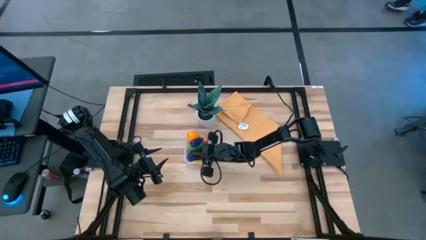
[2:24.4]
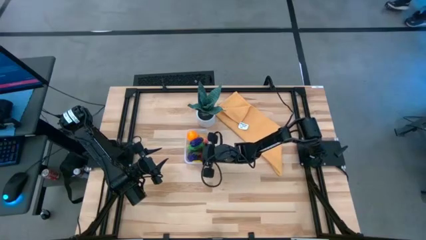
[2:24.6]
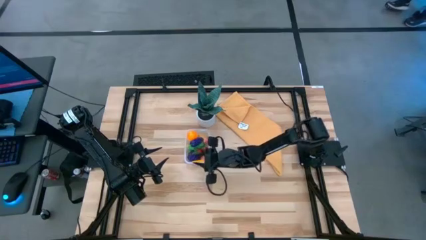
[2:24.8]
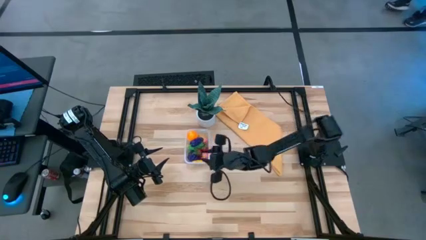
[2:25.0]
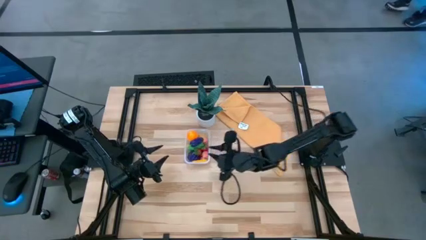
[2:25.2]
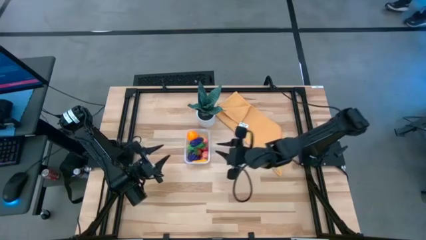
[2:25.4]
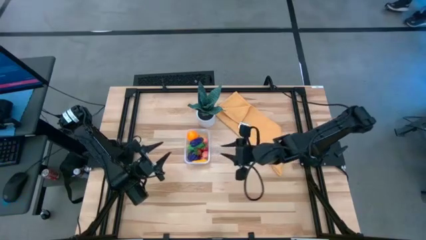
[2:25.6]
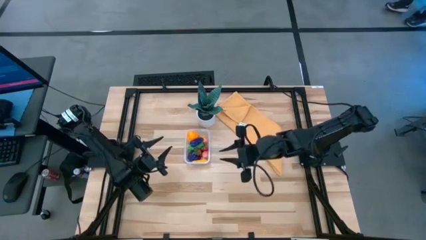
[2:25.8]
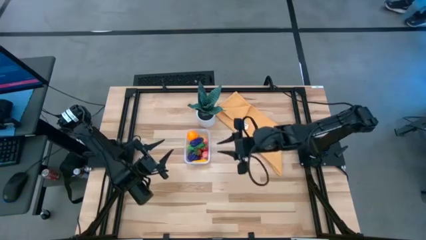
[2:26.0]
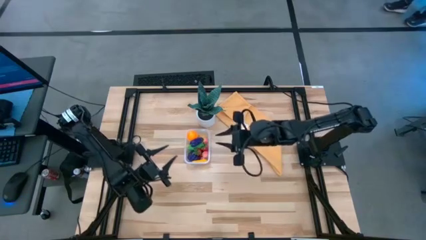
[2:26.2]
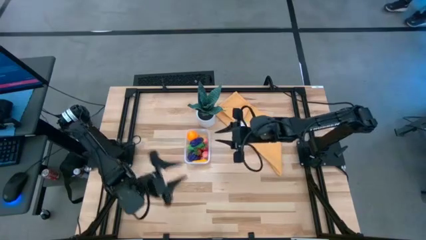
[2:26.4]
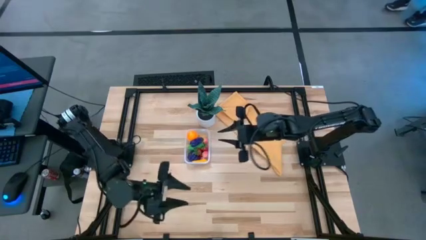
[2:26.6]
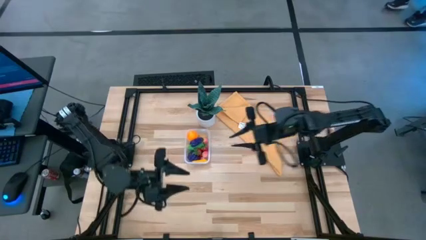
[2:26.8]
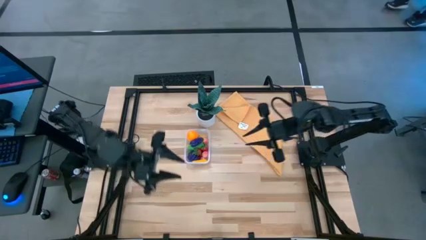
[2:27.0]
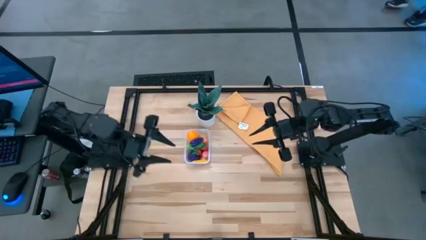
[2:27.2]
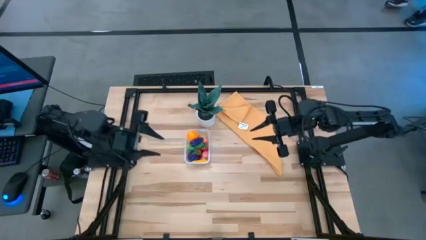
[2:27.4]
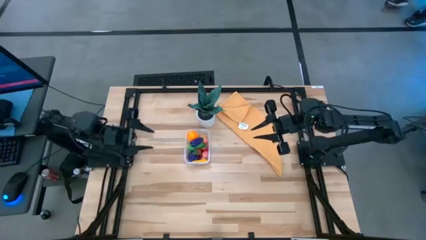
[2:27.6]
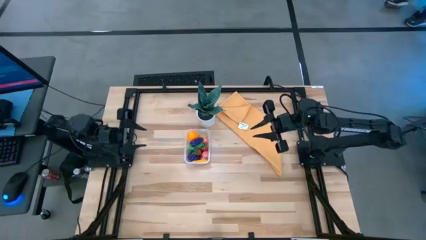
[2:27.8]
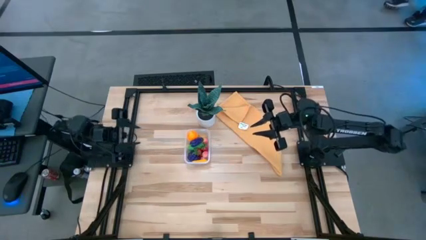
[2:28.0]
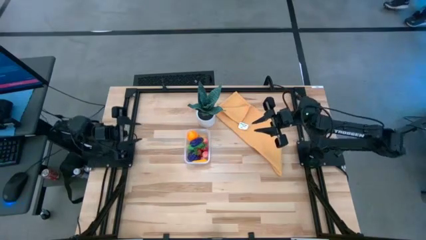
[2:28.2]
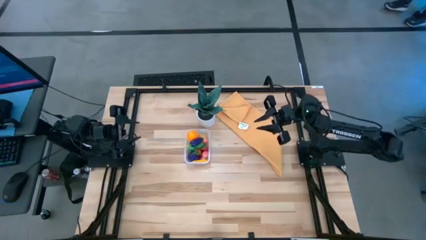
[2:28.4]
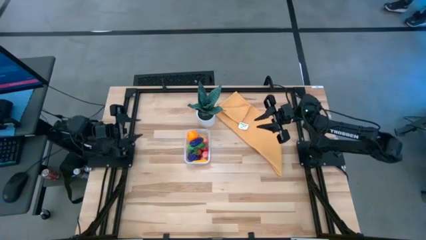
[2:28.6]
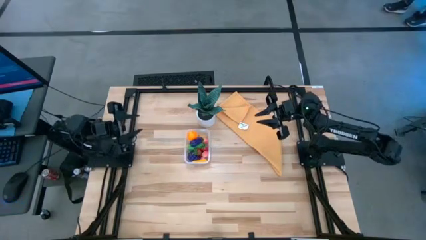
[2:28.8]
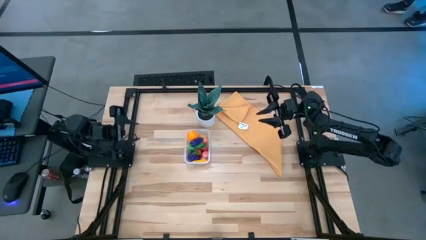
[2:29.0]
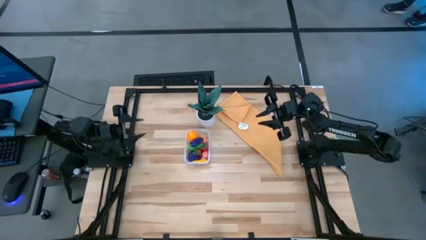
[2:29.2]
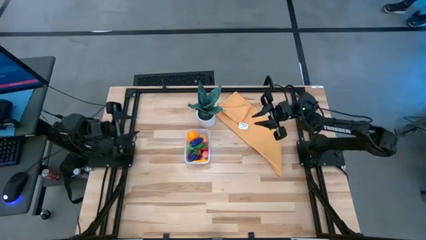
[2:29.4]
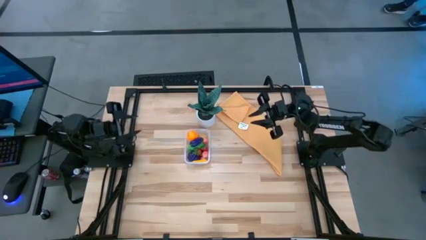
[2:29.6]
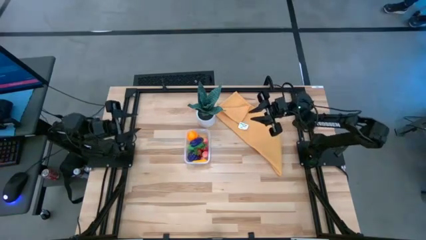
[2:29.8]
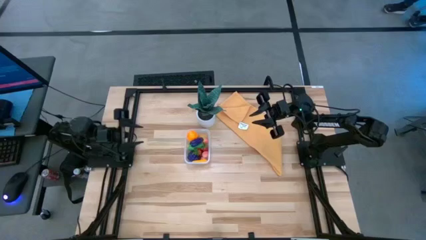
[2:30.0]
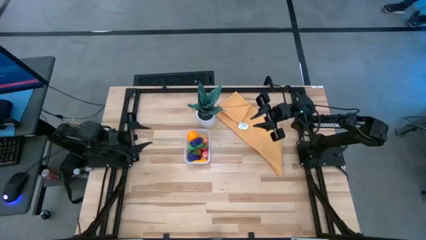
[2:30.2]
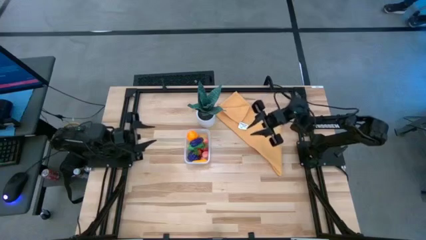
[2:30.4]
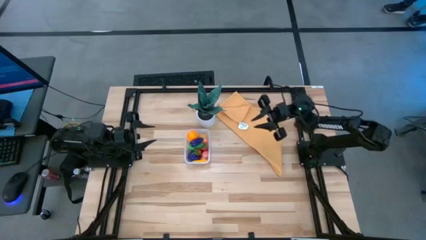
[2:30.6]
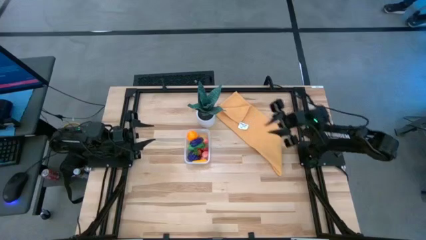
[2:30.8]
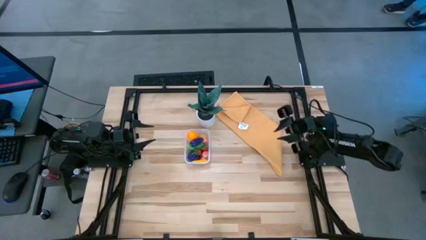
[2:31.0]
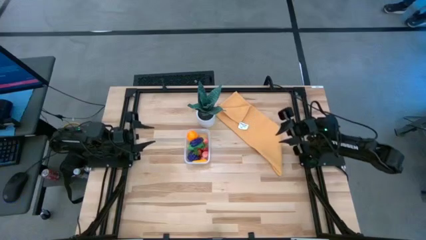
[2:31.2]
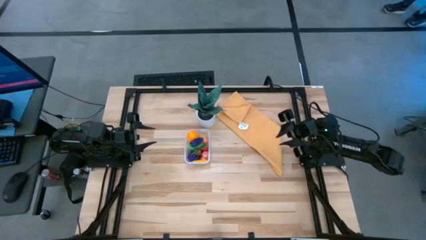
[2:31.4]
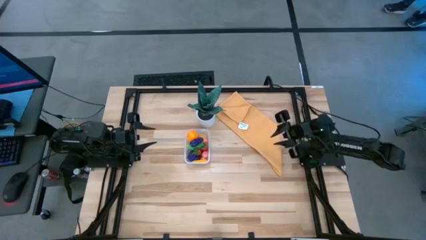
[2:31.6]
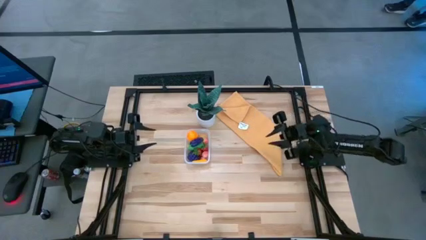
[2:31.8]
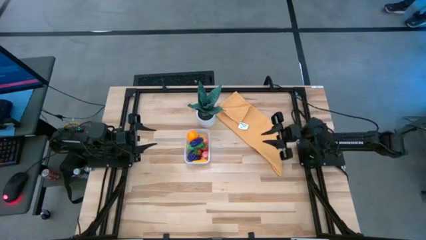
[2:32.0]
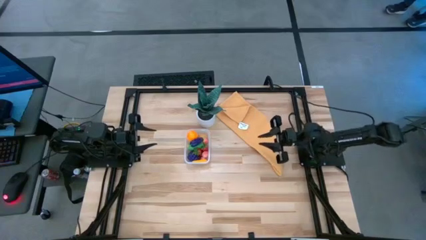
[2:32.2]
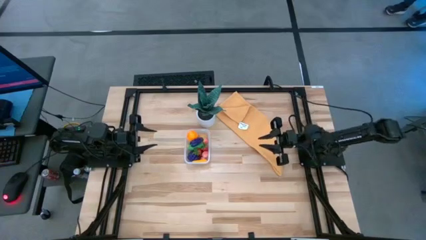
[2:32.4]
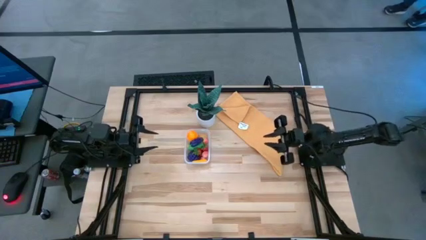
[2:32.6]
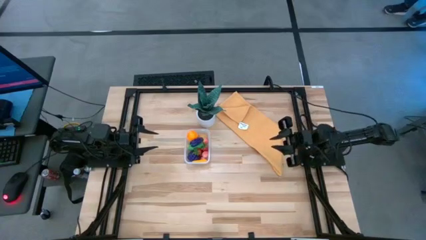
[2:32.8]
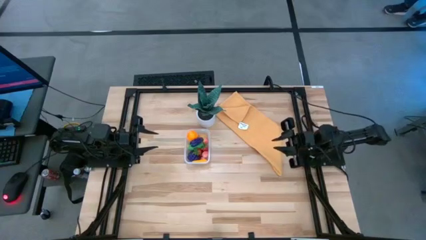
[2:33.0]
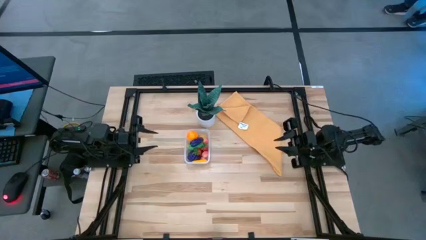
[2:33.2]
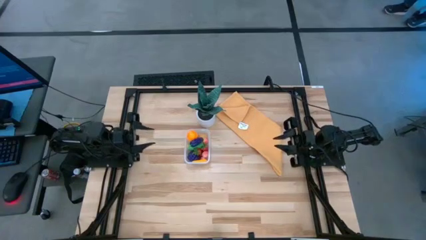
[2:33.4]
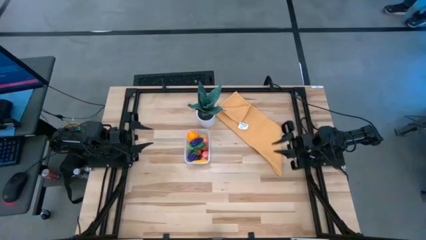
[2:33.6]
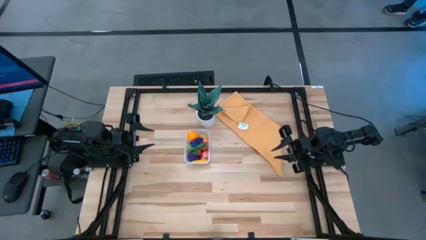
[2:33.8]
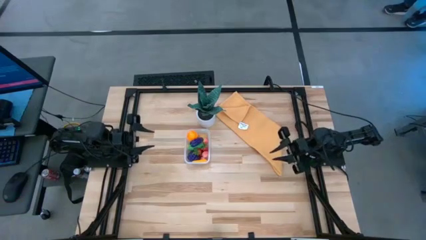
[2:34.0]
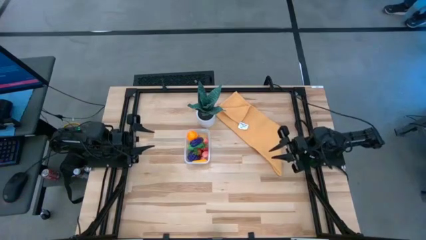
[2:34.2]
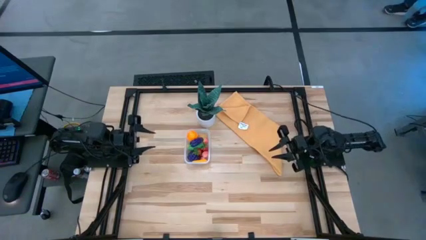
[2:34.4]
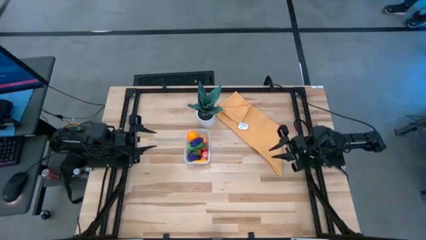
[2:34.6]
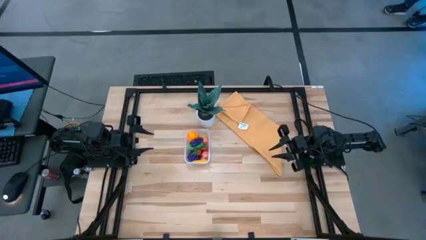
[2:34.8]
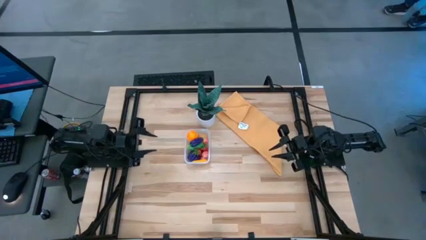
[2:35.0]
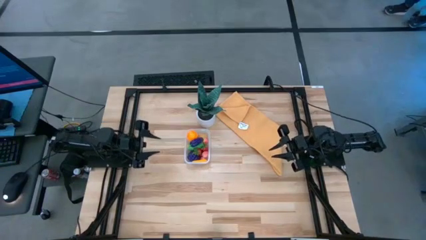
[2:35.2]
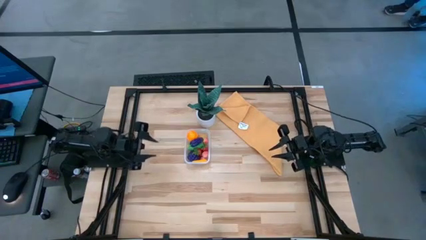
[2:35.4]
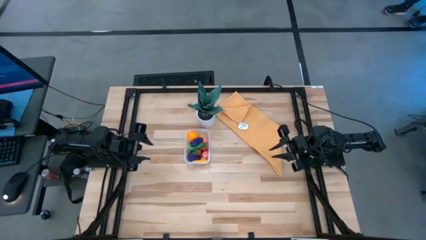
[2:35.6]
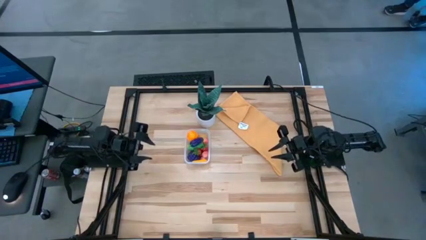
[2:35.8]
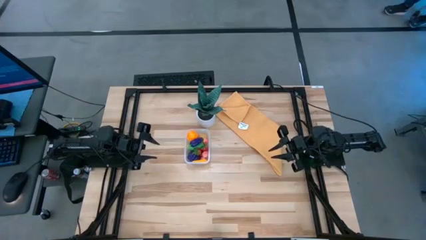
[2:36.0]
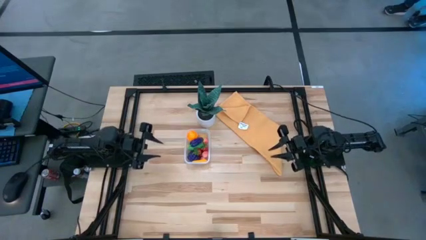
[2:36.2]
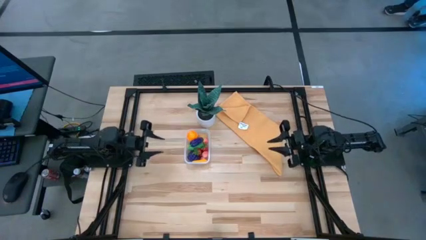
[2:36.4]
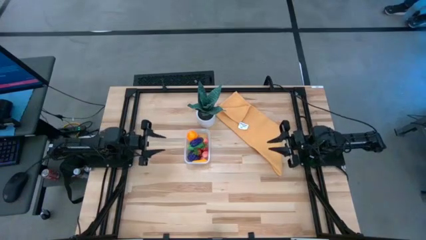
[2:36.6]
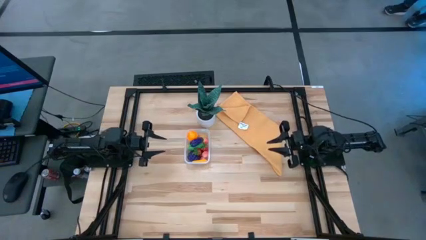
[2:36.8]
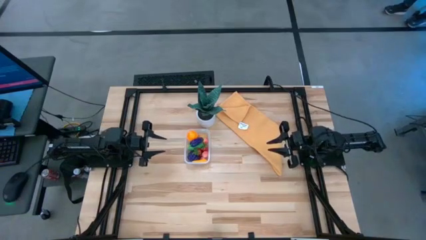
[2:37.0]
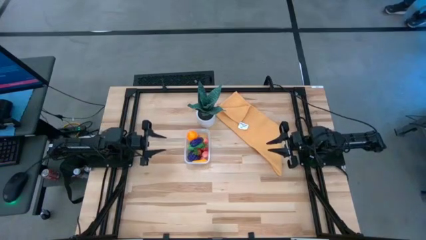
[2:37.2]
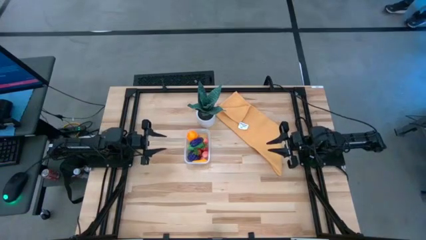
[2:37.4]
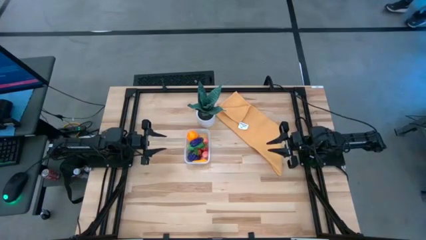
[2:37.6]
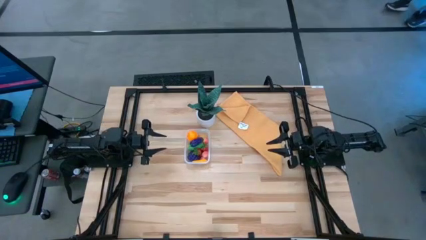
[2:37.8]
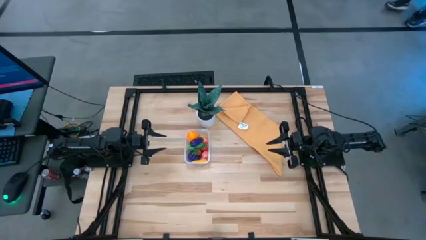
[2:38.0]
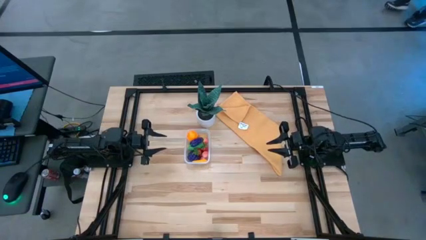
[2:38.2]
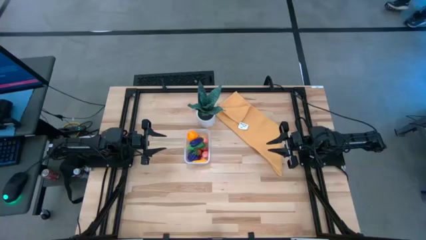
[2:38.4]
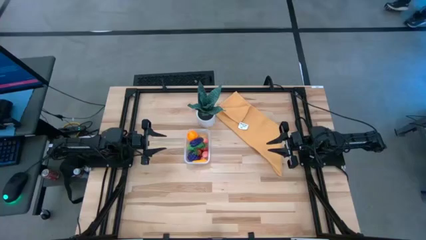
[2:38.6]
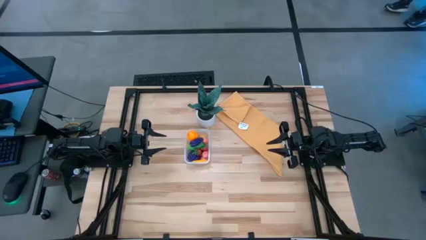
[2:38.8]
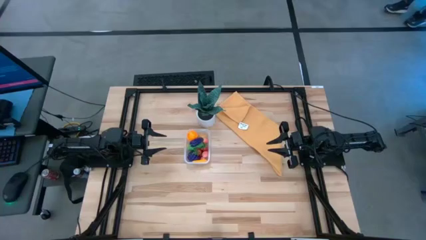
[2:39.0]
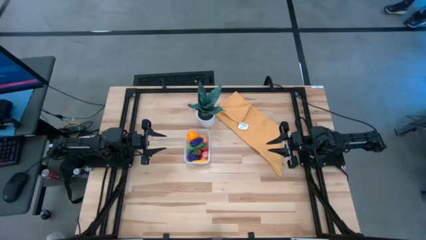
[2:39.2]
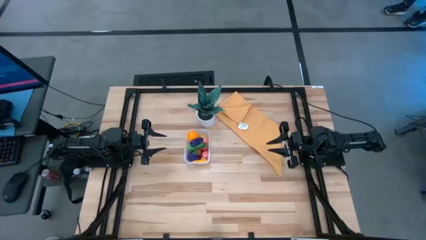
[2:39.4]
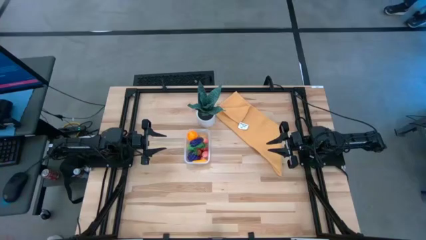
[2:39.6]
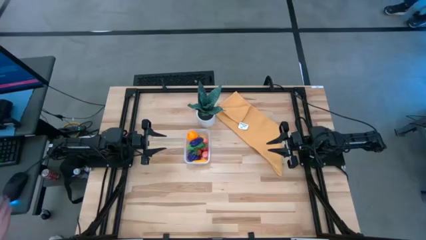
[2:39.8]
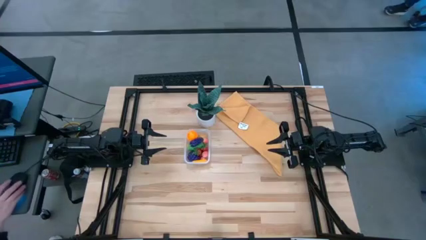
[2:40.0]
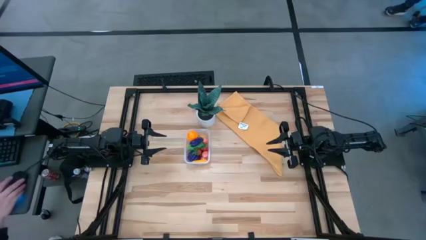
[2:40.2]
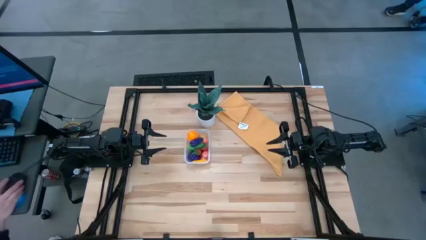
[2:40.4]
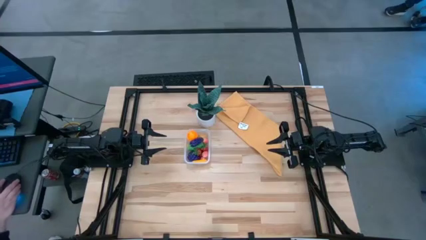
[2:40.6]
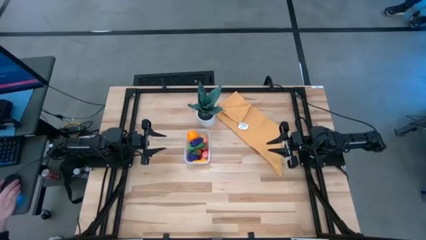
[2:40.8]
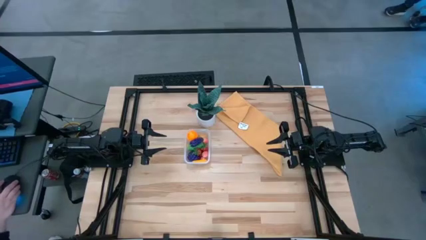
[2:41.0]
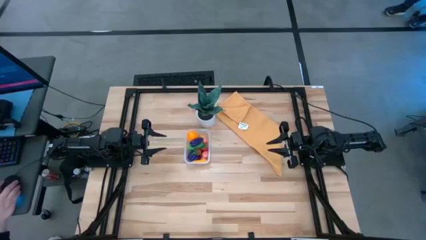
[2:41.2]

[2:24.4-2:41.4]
Task: Pick and placing Produce into tupperware
Return to Home Position
